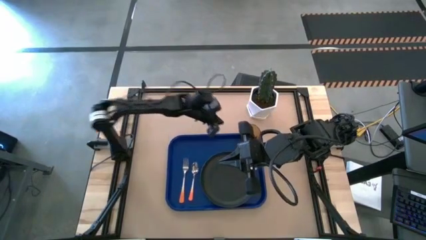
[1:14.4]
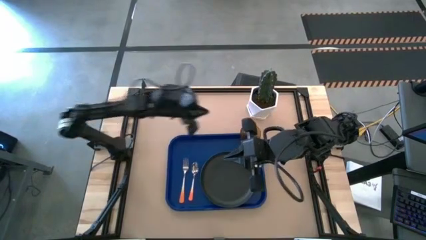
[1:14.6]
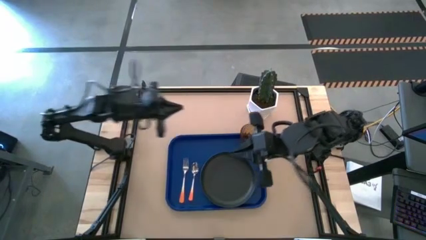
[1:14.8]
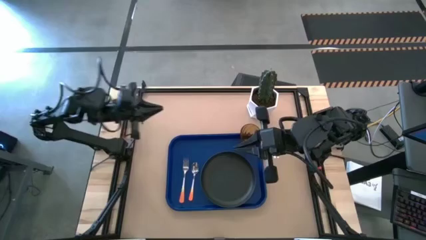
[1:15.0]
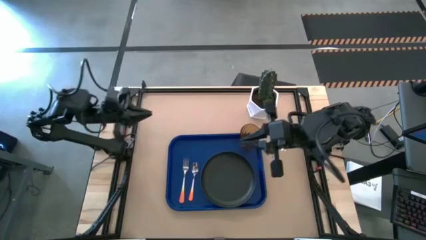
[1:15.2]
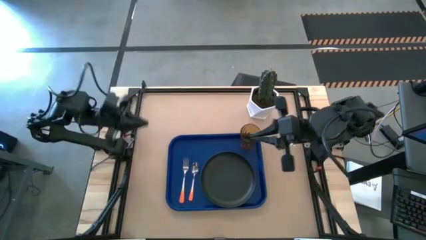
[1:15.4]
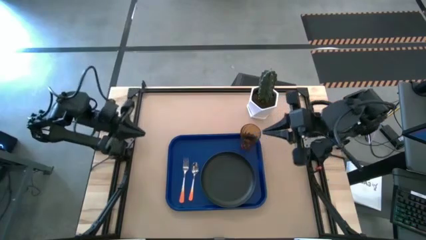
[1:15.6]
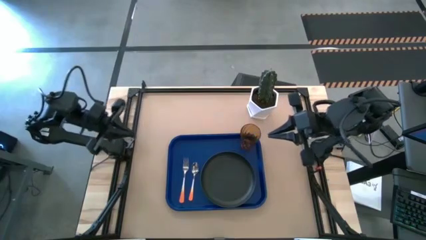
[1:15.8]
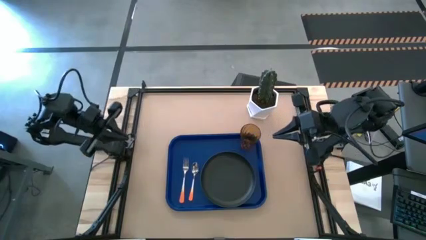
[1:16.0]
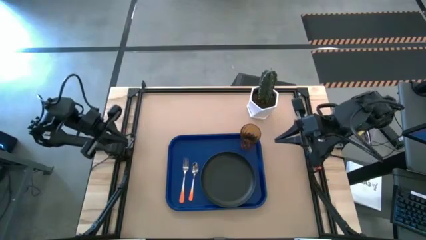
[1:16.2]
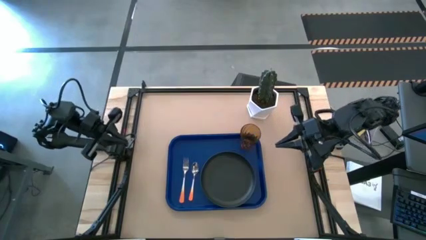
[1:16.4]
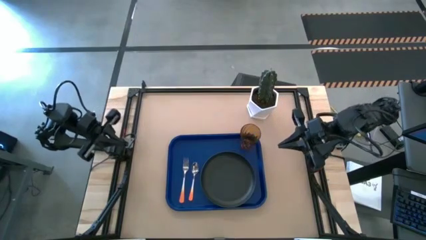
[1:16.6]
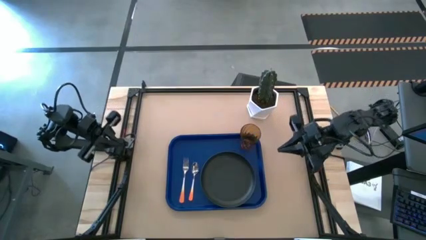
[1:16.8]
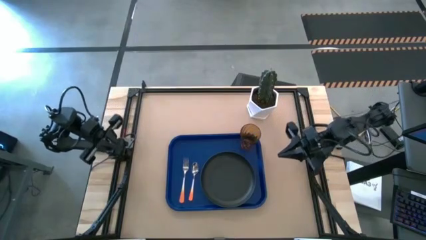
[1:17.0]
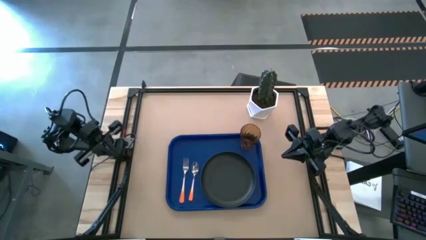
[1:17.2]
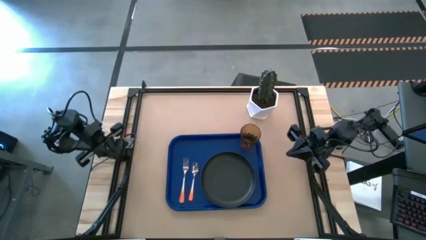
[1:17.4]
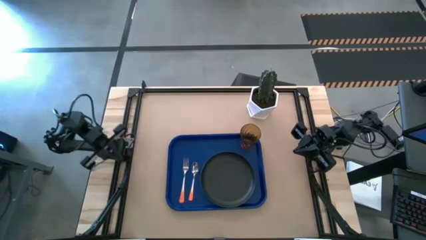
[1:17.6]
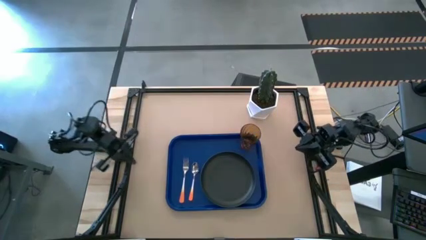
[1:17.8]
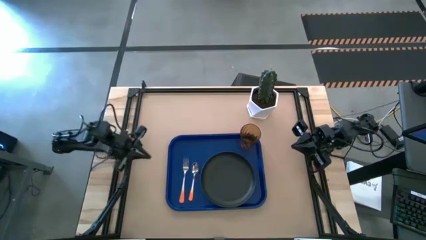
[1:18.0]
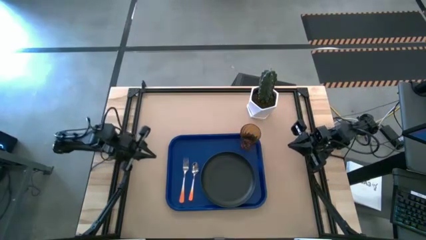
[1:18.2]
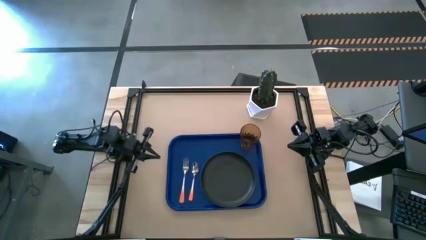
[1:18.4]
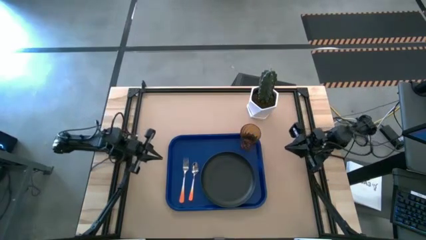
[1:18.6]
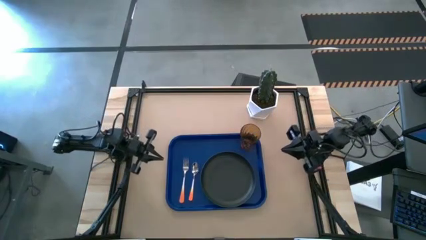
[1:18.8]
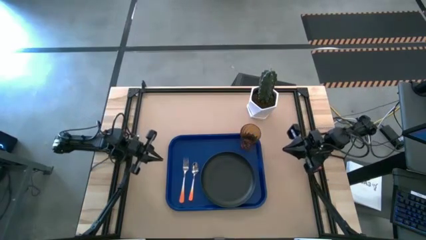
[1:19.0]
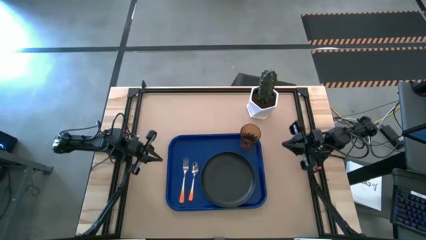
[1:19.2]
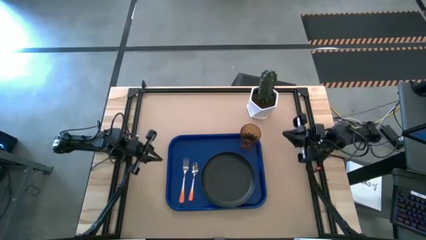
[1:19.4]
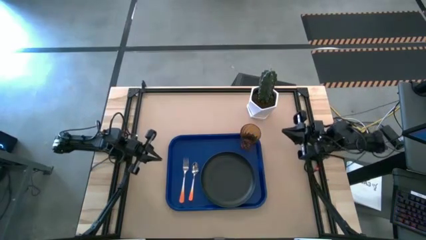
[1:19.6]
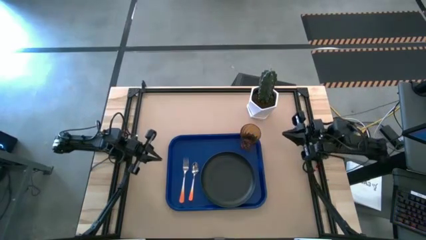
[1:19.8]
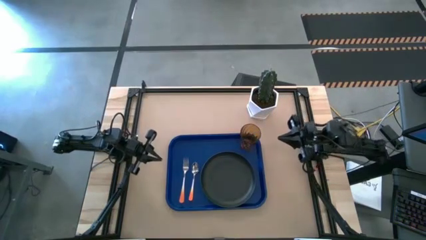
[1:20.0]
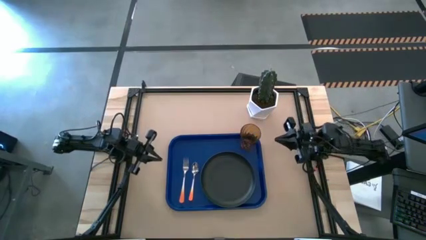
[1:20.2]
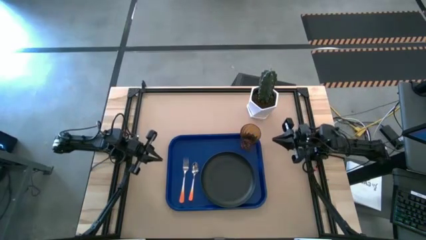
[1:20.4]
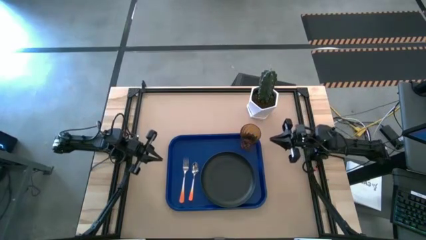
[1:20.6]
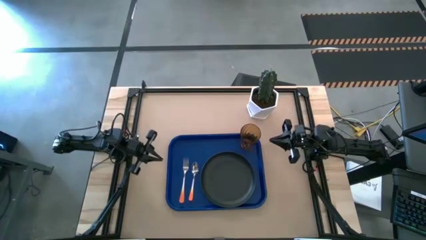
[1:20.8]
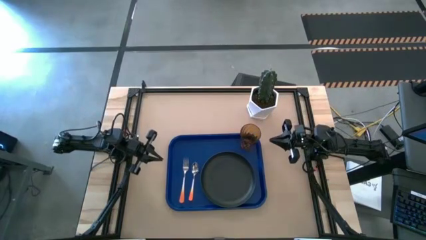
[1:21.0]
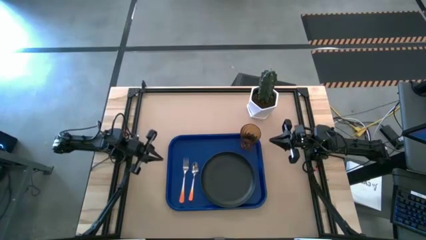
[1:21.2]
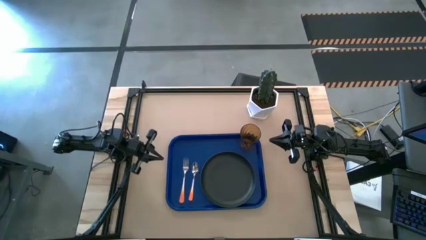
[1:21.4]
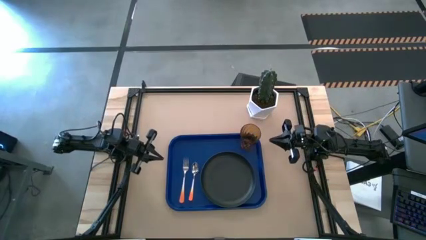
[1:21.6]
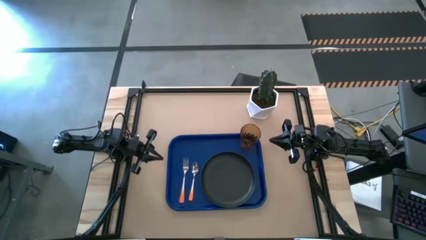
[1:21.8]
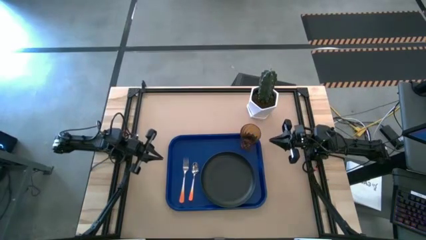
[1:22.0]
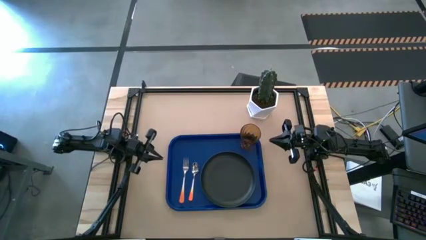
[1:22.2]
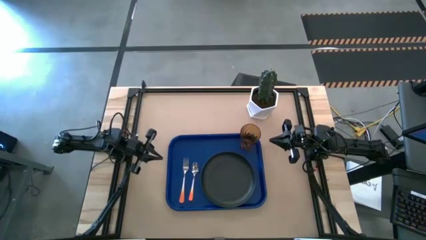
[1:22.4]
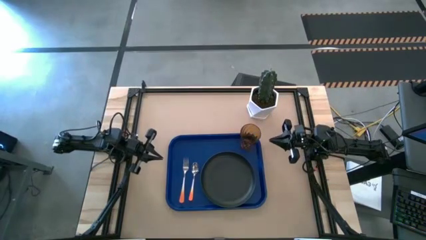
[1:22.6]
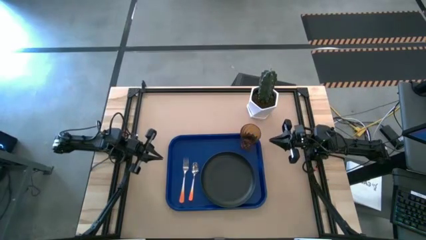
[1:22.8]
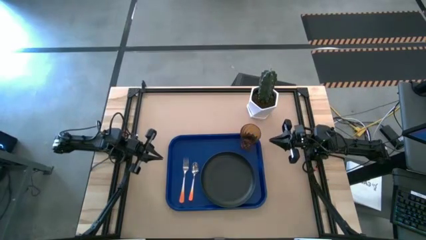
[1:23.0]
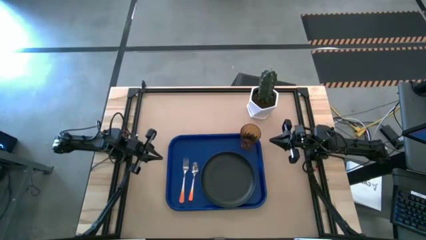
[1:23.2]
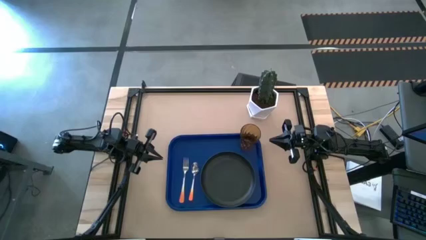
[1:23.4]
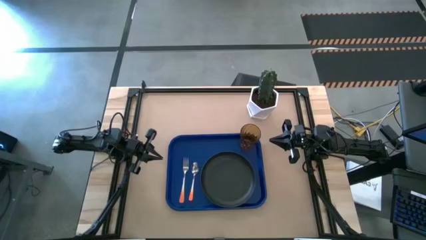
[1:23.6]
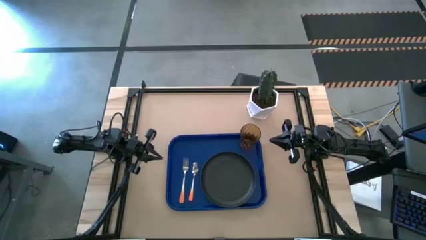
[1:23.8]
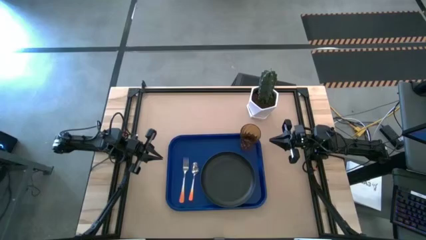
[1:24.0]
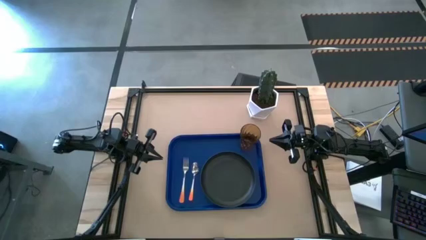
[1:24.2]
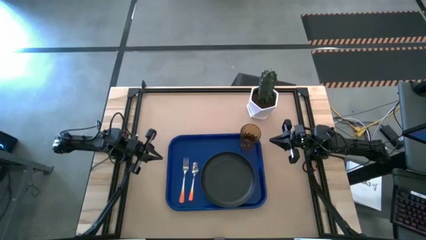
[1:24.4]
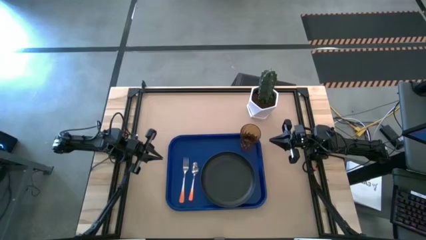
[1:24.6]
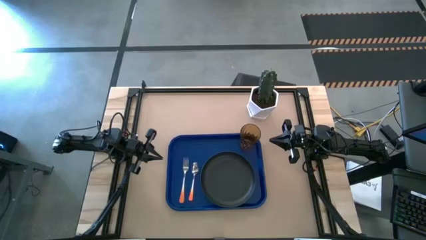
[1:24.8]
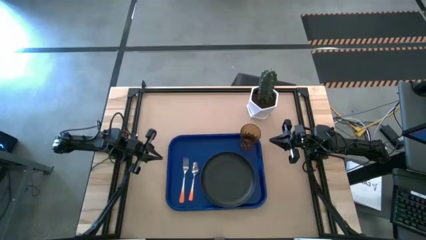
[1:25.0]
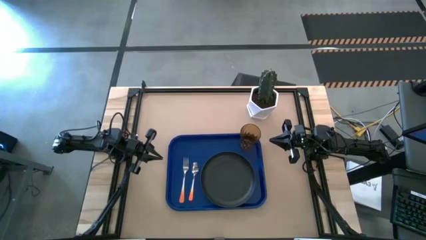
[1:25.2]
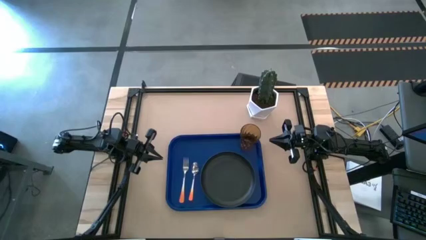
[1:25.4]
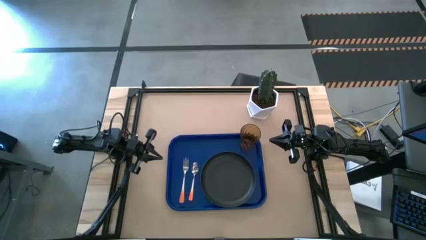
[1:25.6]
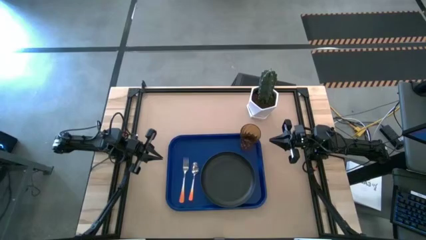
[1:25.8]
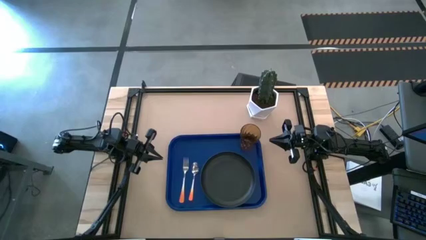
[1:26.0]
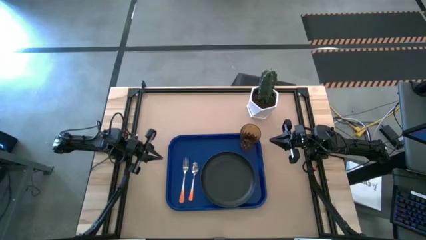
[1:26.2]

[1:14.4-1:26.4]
Task: Pick and place plate/cup/fork/spoon on tray
Return to Home Position

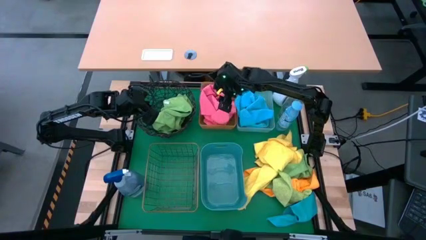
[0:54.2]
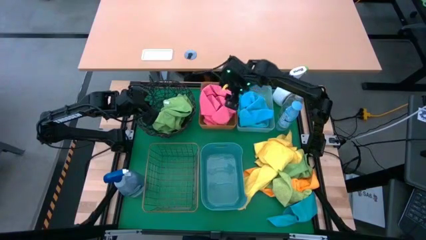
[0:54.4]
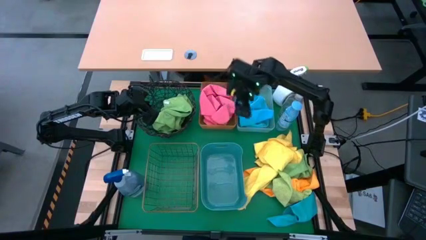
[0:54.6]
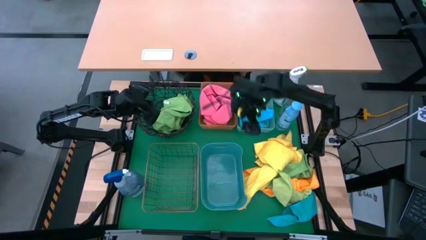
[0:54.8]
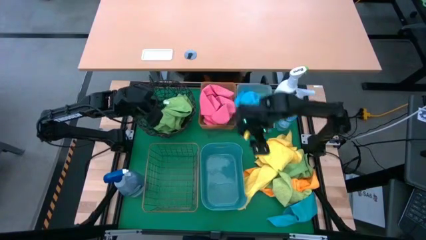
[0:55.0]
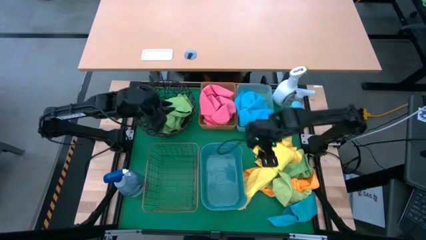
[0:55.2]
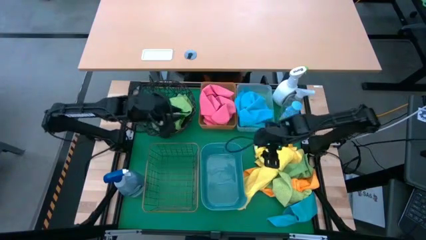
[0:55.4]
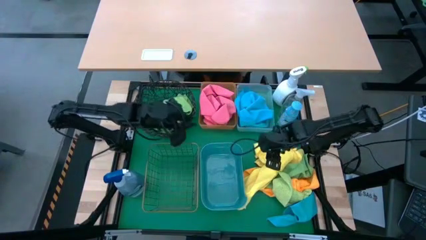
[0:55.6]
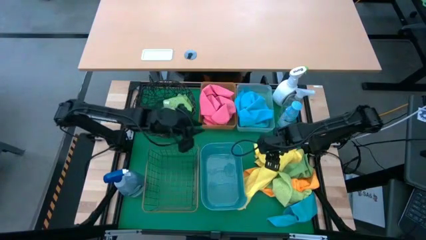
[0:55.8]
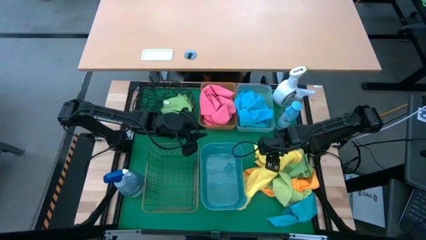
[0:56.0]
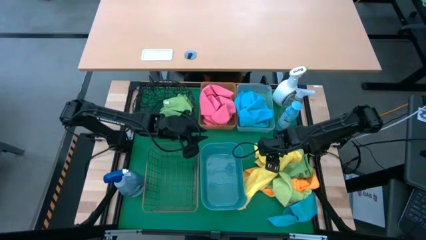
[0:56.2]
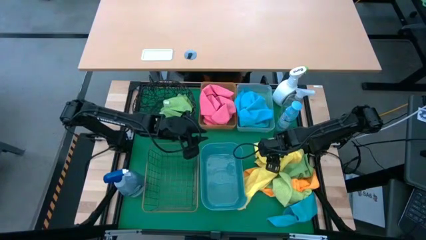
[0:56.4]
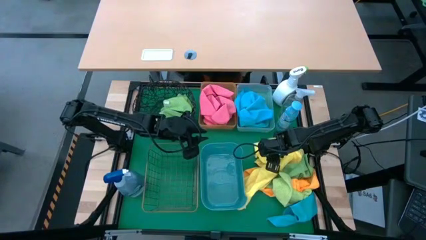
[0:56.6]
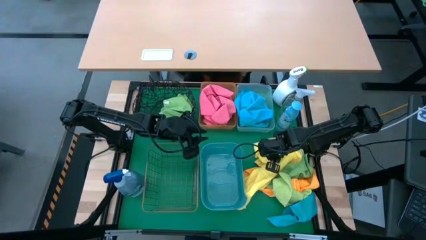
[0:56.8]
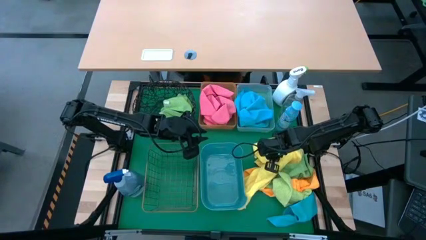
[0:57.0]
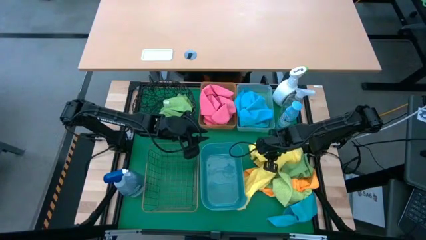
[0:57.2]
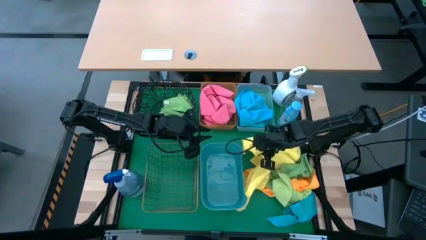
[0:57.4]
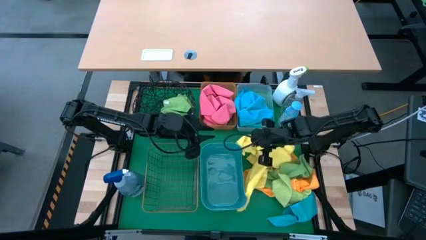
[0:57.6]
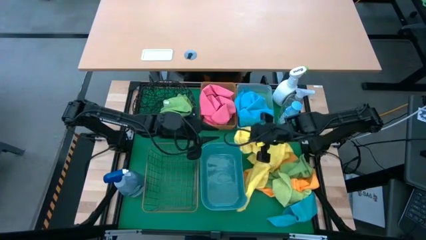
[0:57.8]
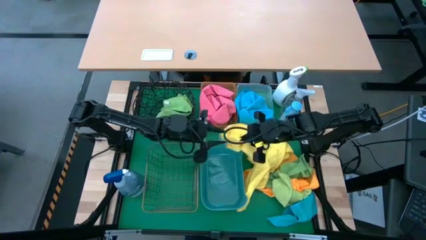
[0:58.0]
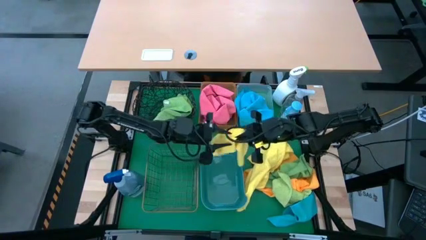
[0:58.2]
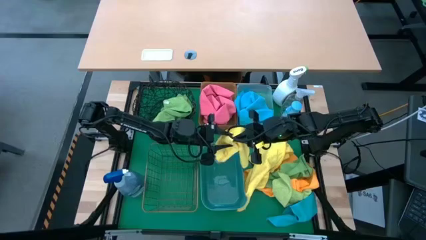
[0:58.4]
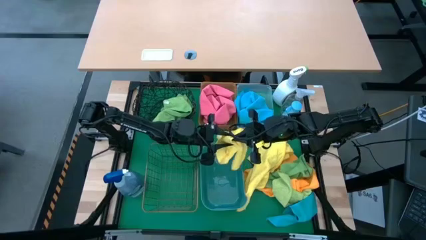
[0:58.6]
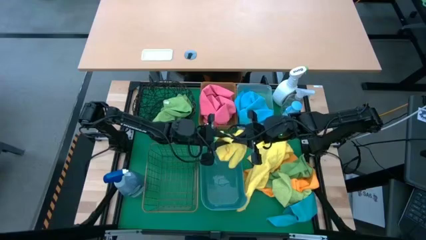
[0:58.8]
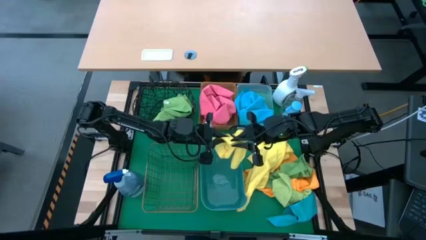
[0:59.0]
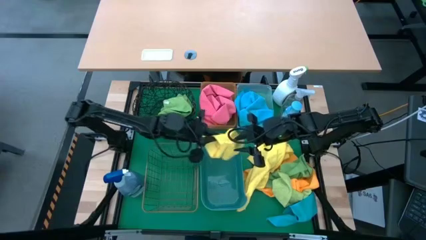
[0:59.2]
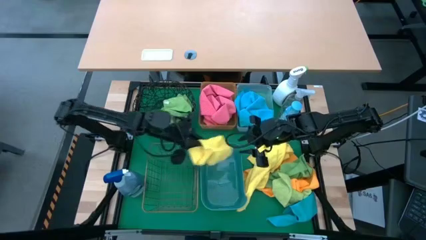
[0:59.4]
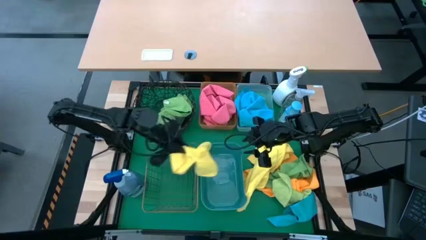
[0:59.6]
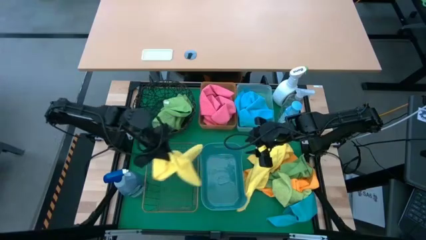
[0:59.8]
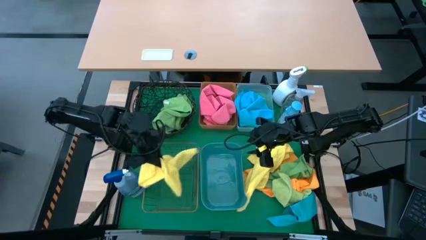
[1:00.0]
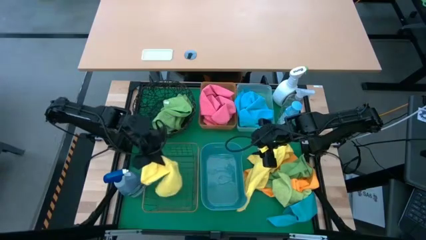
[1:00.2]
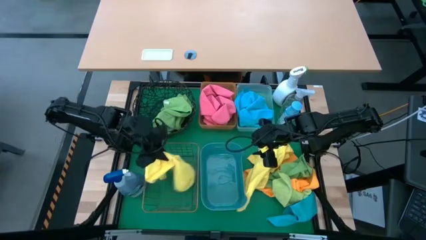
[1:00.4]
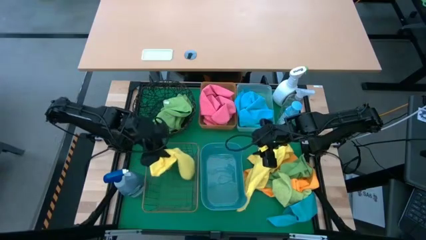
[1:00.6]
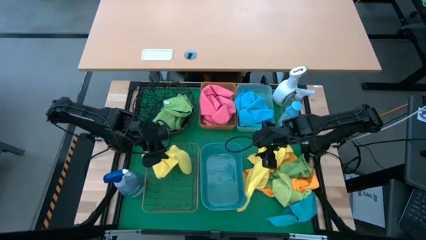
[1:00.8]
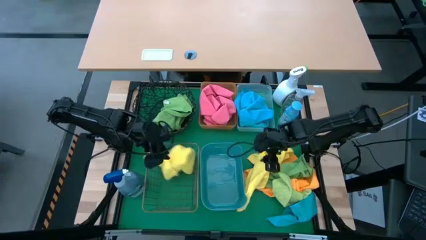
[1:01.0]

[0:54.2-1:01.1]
Task: Sort microfiber towel by color & place in baskets
Put the yellow towel into the gold wire basket
